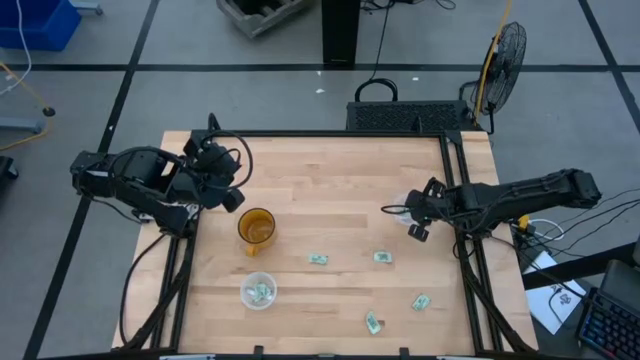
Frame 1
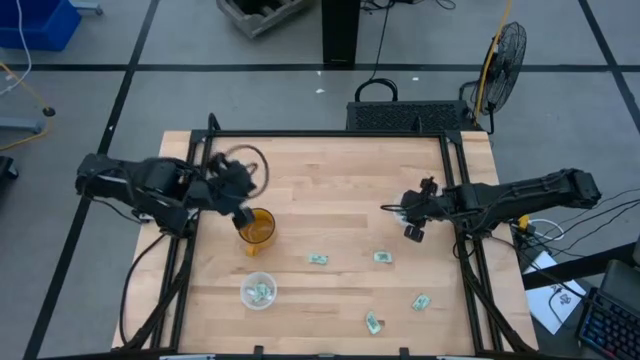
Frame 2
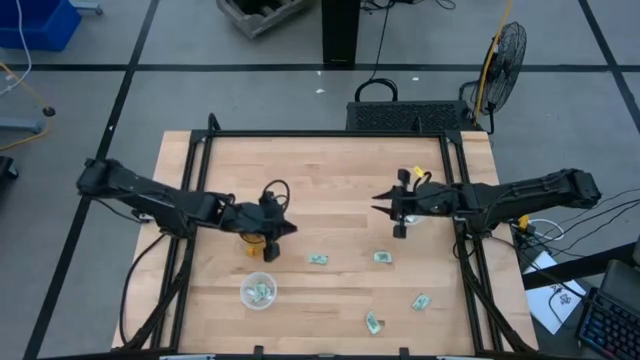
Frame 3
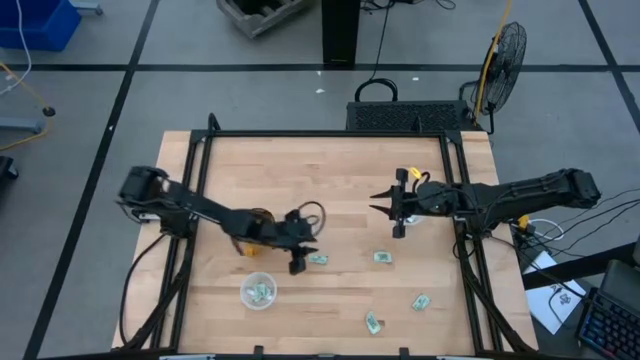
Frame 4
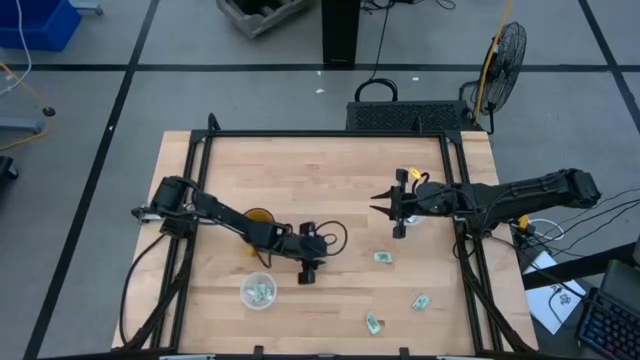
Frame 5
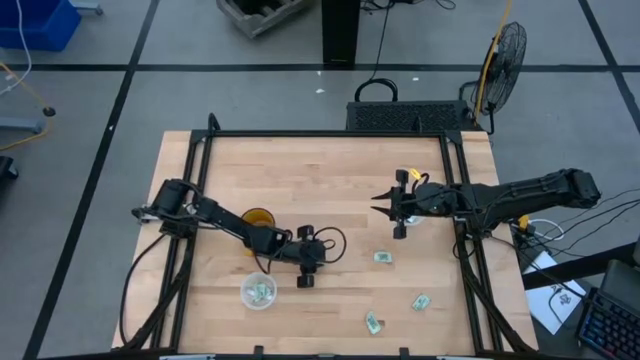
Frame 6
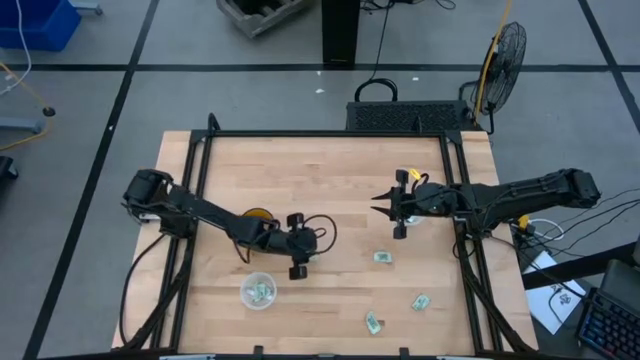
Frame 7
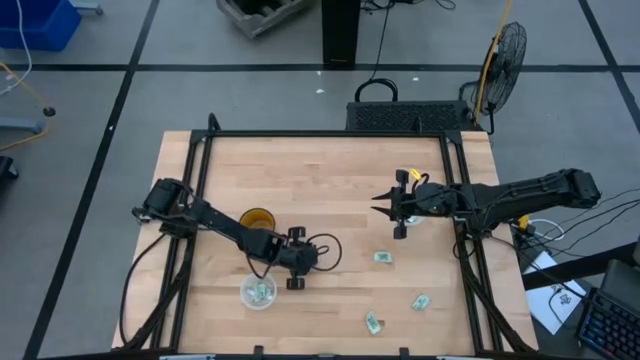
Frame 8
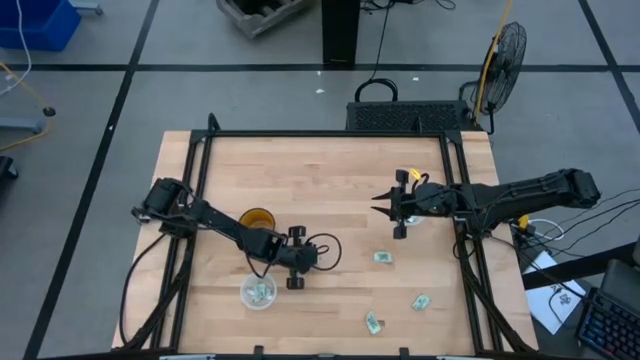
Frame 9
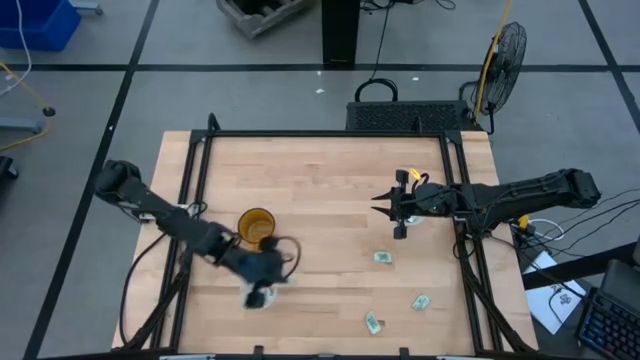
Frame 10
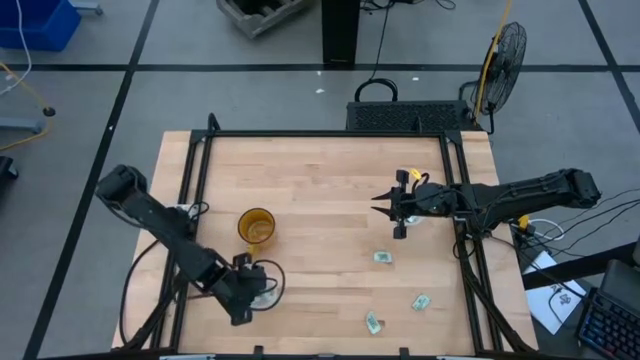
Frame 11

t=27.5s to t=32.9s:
Task: Pick and place Stevia / Truvia into bins
Put the stevia packet into the bottom transparent container

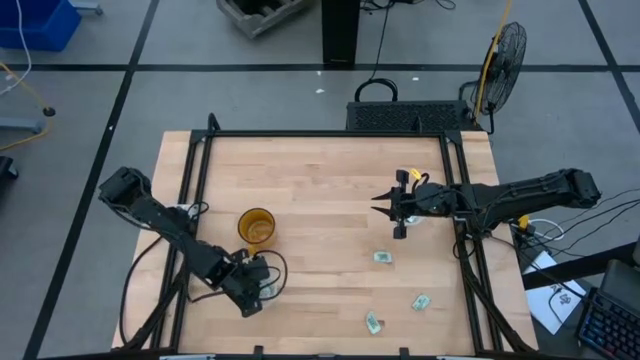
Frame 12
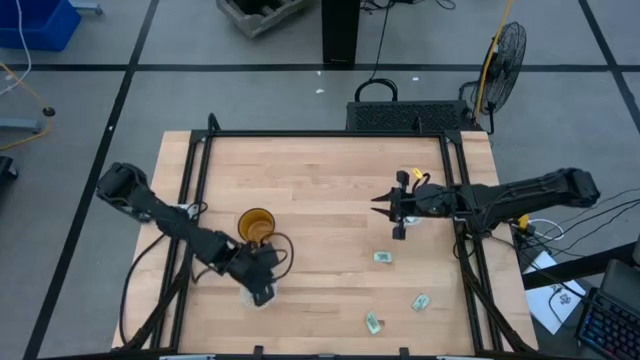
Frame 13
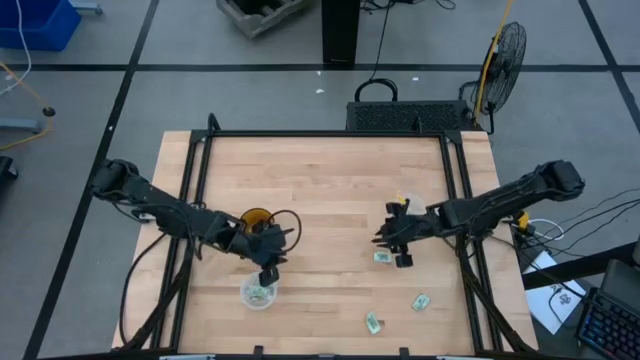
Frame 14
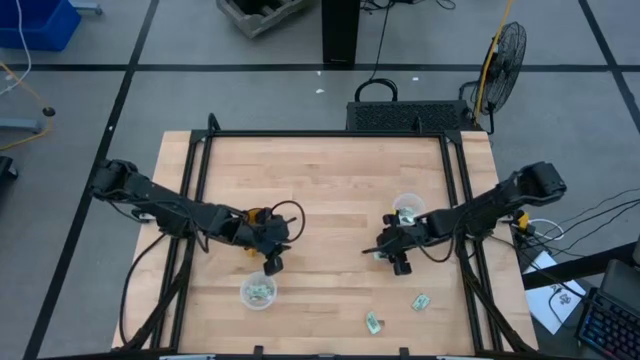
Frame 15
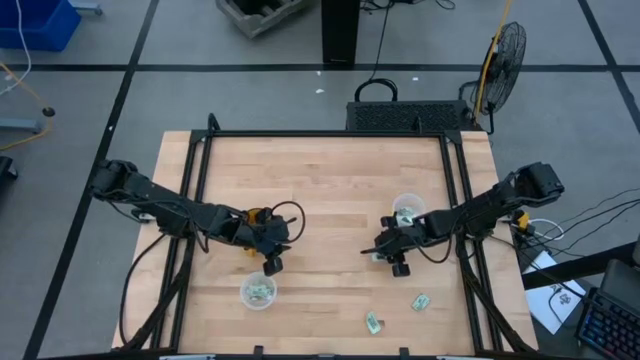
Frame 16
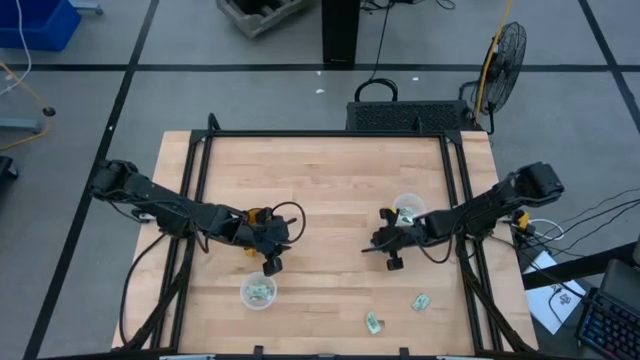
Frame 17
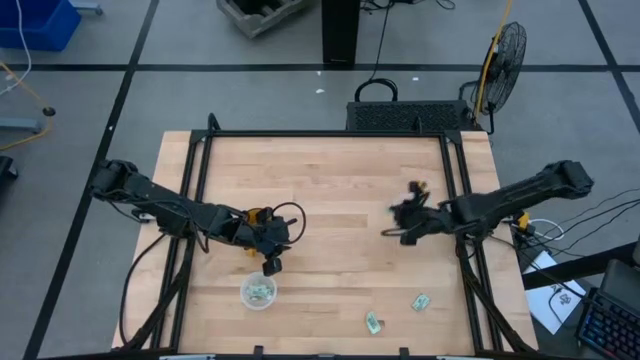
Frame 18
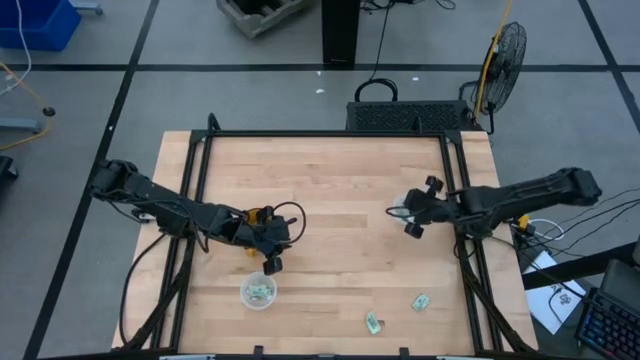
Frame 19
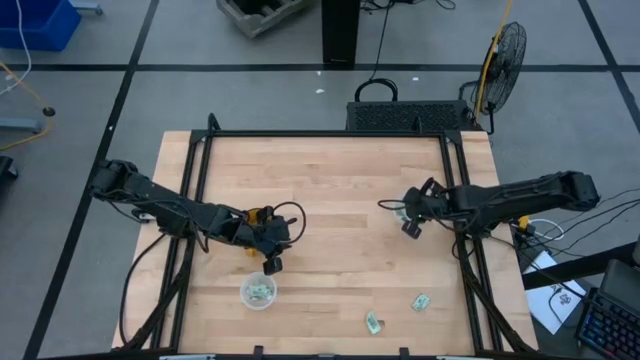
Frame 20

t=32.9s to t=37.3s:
Put the stevia packet into the top transparent container

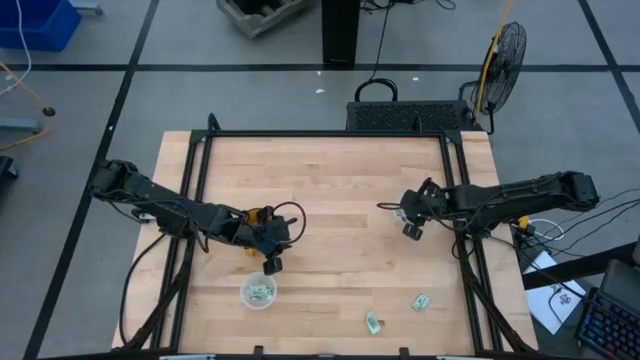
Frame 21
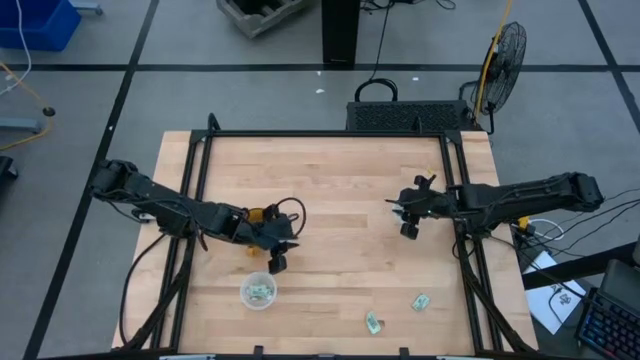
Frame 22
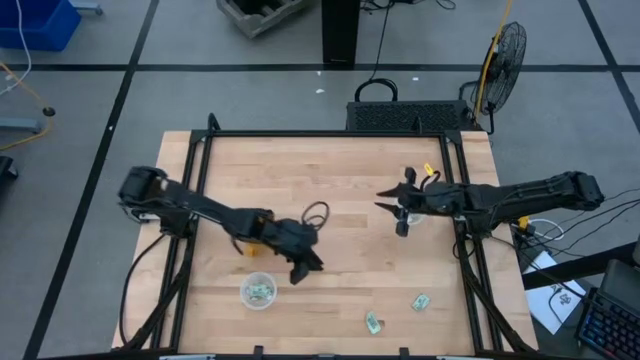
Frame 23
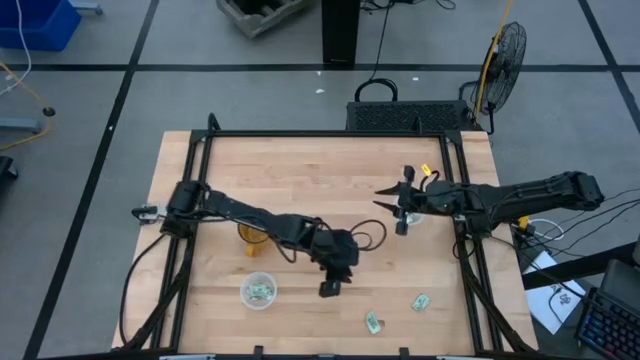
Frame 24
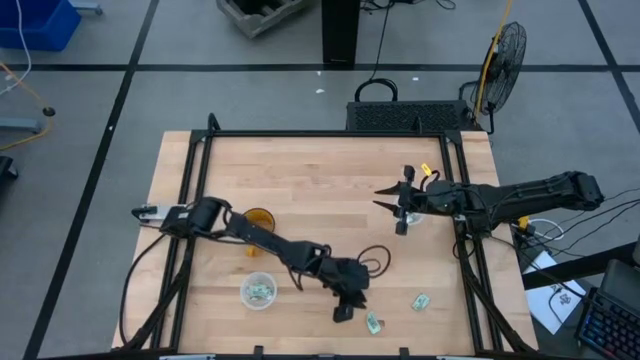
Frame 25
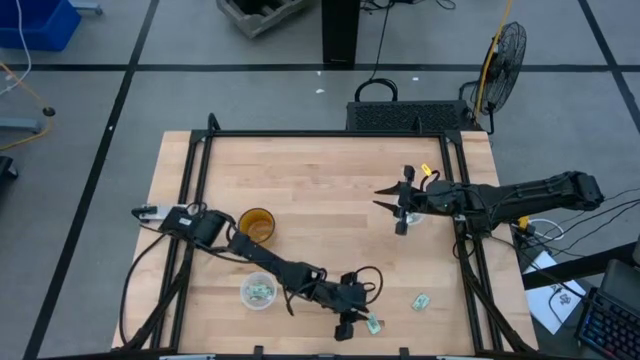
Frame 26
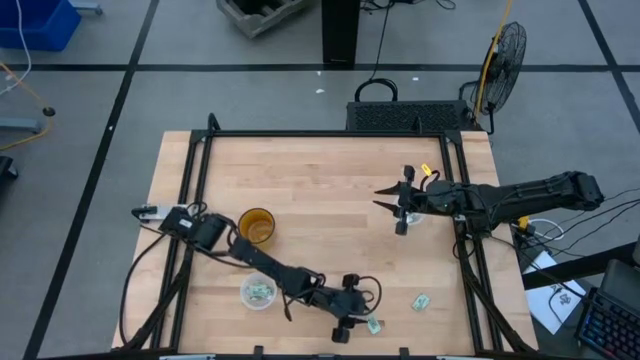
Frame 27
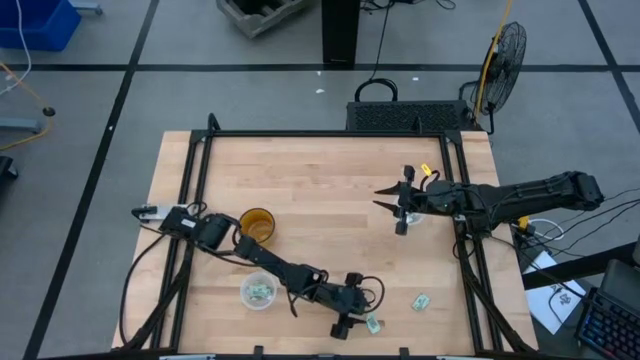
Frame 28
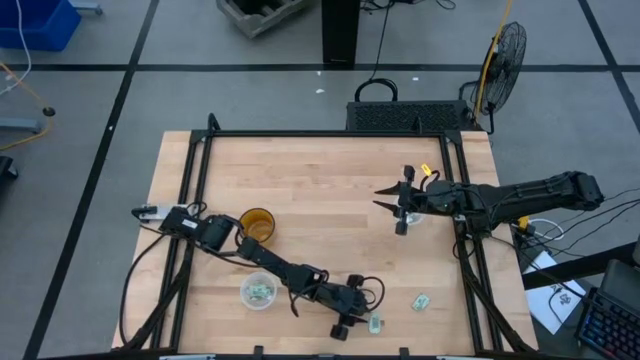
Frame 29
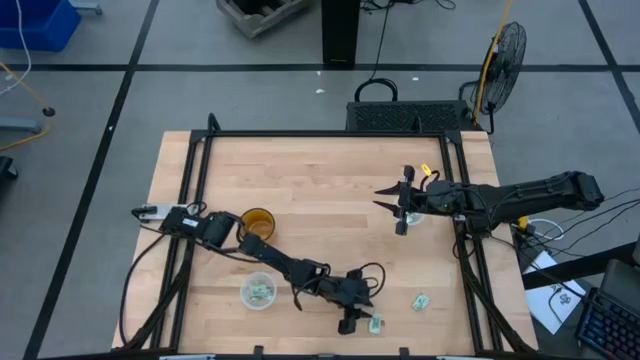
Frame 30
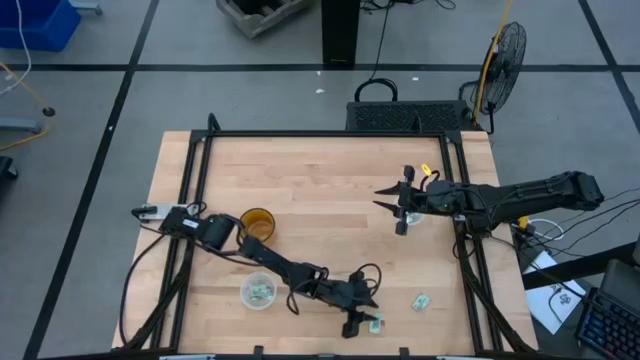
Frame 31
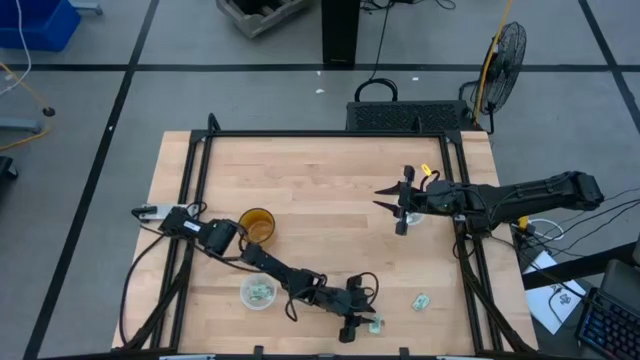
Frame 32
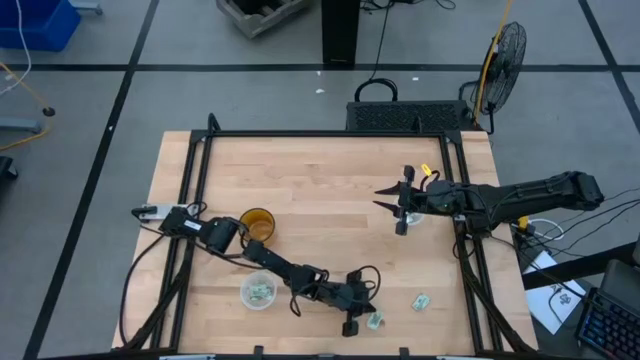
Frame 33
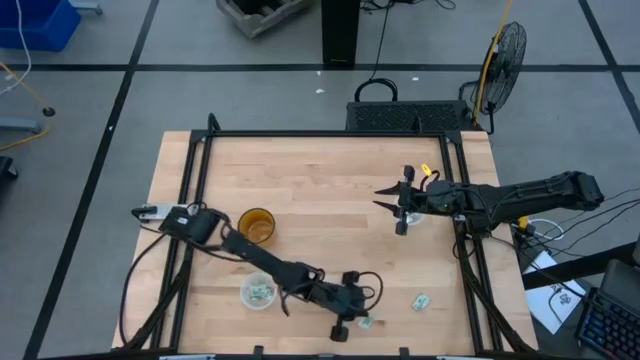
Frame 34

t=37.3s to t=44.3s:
Put the stevia packet into the bottom transparent container

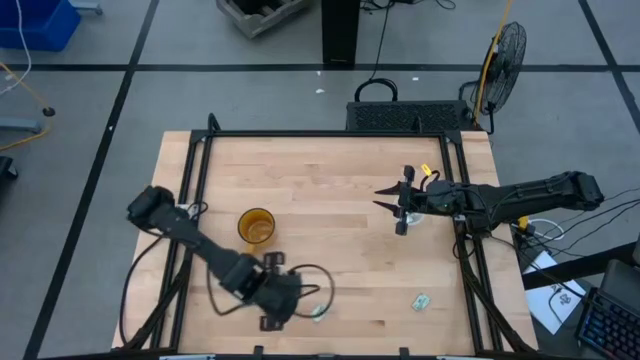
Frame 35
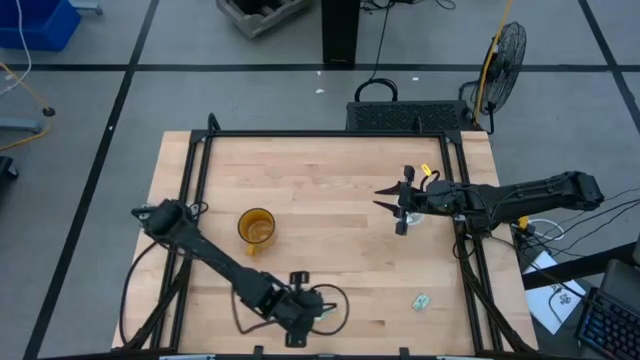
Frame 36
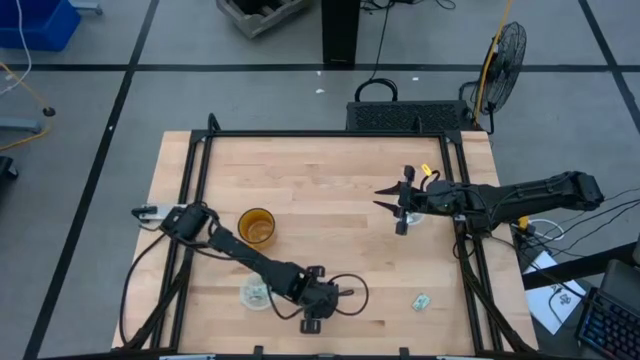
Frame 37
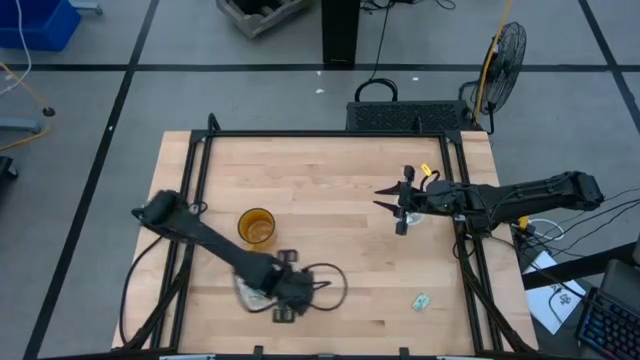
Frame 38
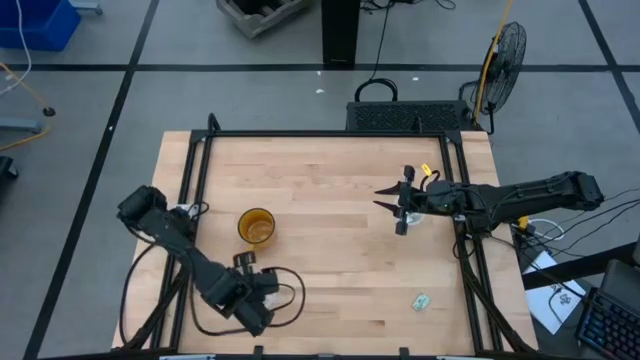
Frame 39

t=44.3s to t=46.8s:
Put the stevia packet into the bottom transparent container

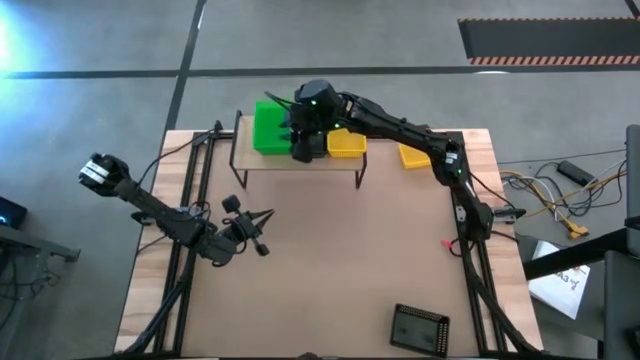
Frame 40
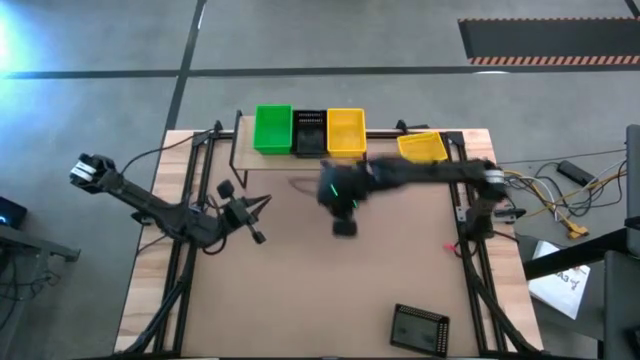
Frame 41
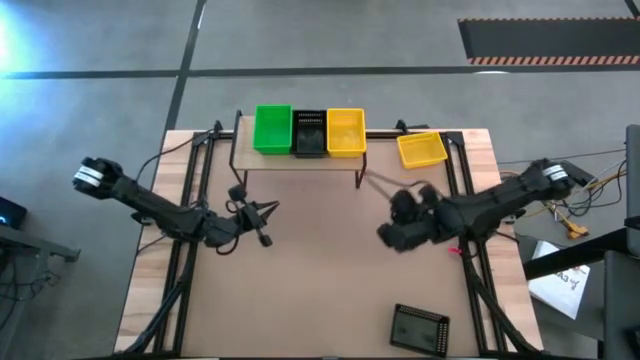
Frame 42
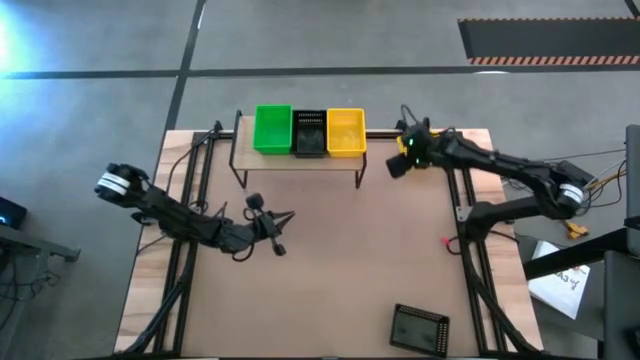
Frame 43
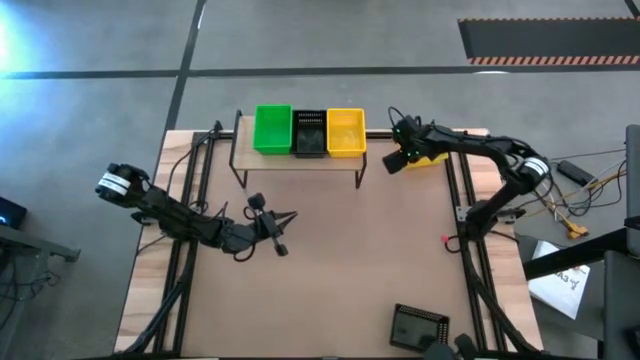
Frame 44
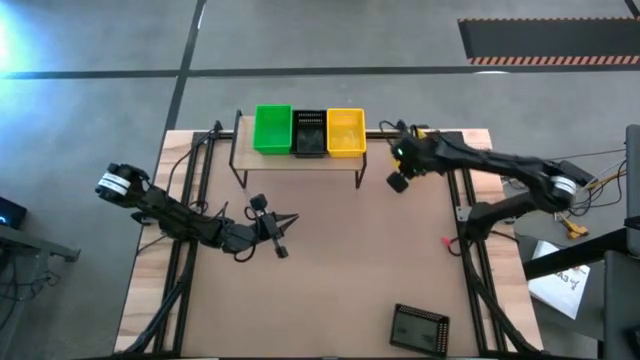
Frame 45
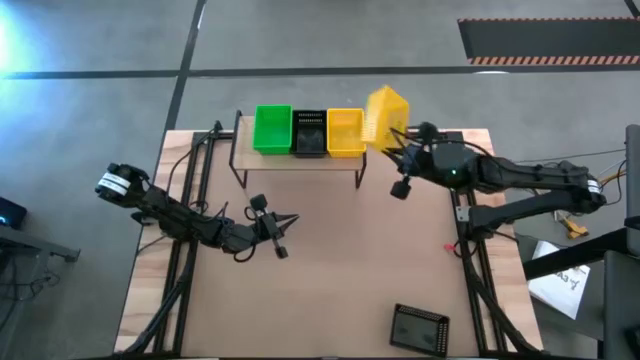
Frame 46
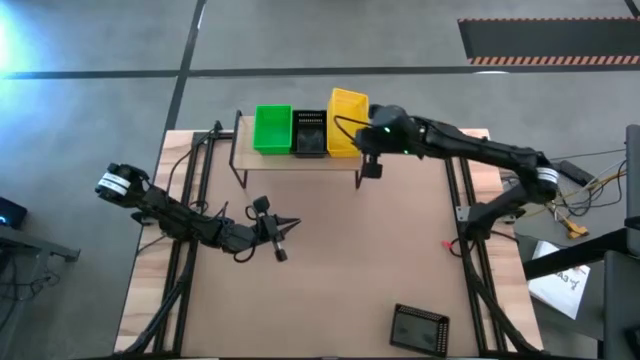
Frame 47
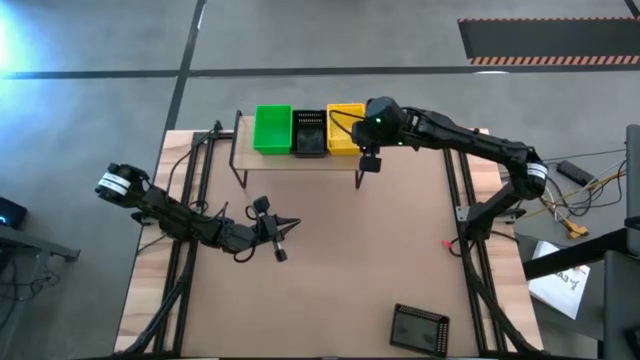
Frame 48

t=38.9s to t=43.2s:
Task: Stack baskets on shelf by color
Stack the yellow bin on the yellow bin on the shelf
